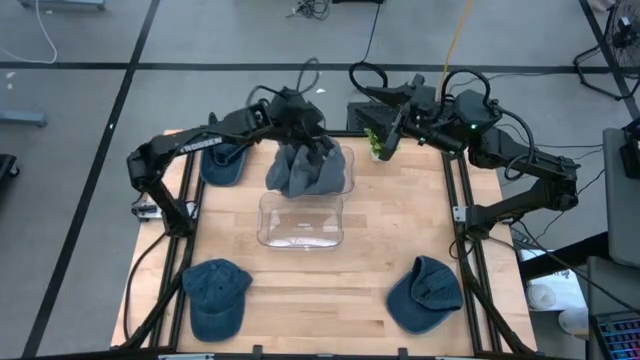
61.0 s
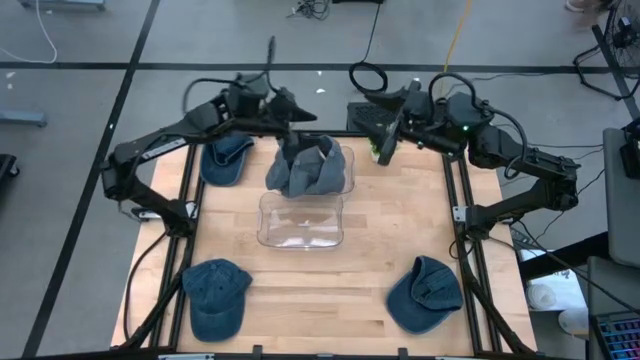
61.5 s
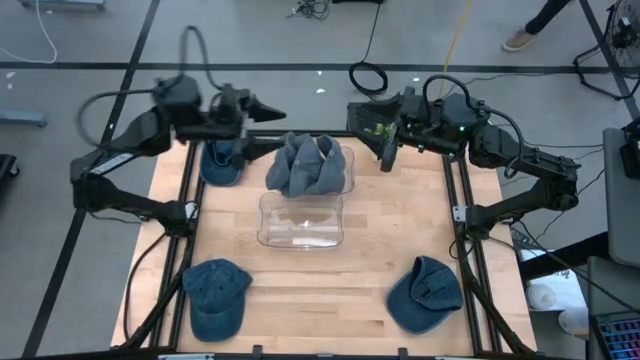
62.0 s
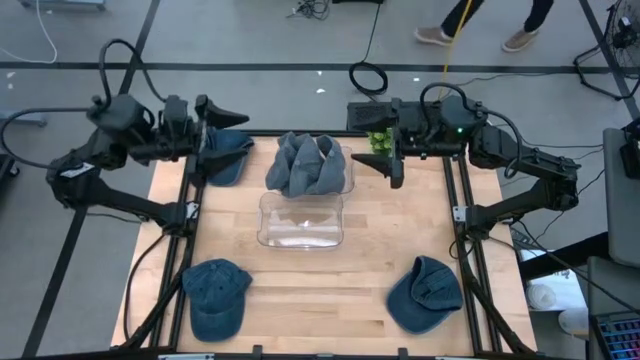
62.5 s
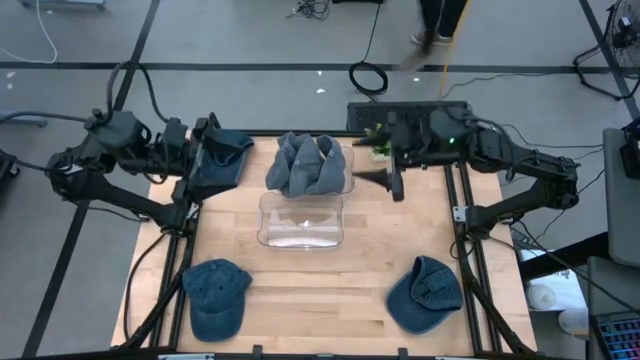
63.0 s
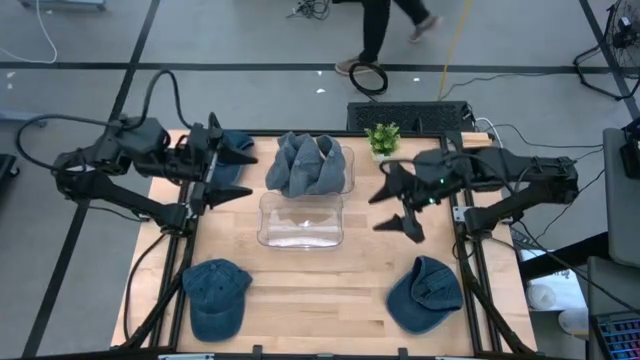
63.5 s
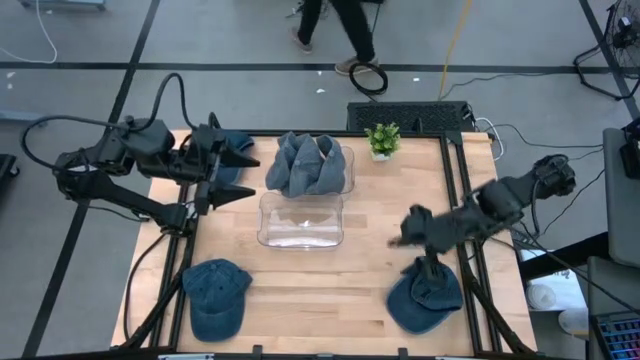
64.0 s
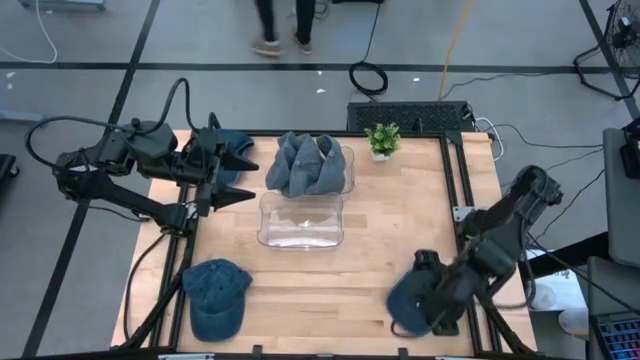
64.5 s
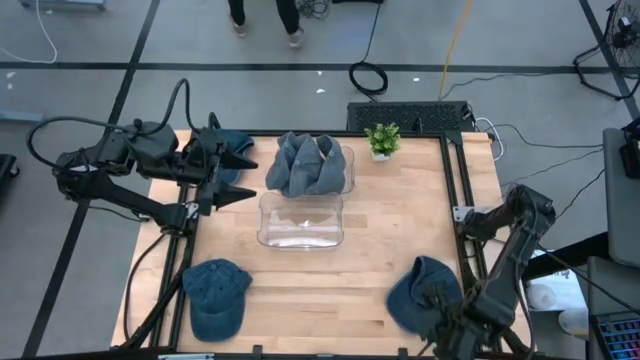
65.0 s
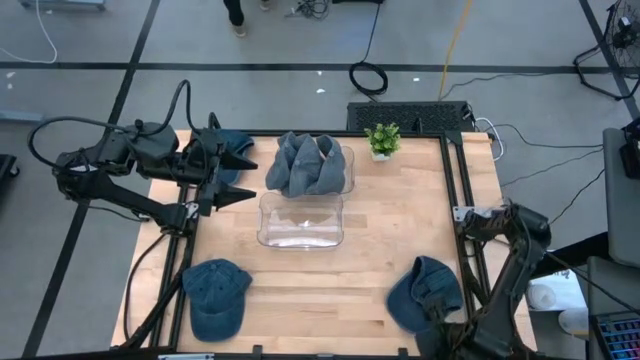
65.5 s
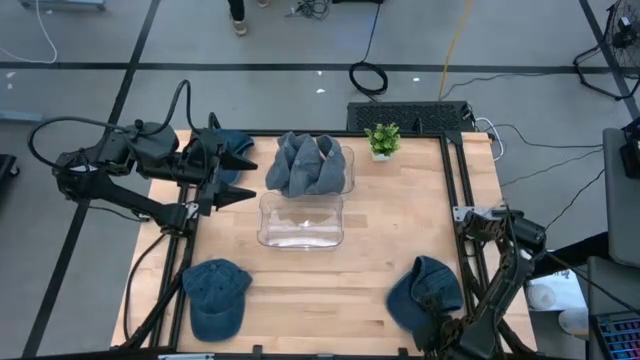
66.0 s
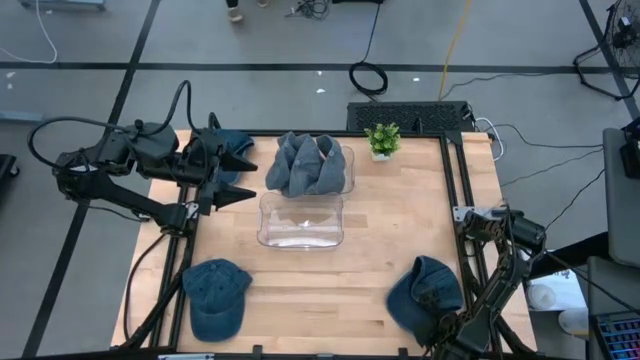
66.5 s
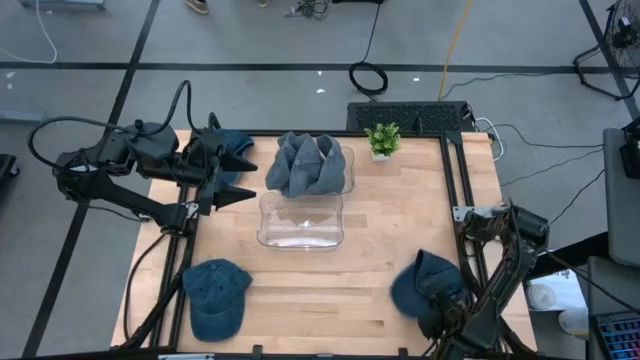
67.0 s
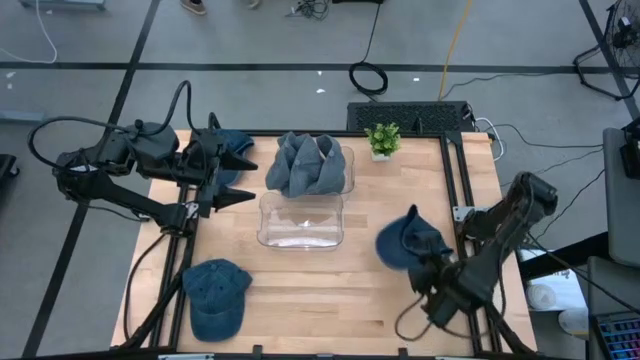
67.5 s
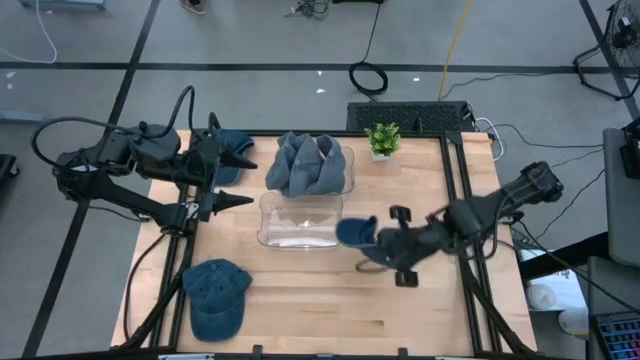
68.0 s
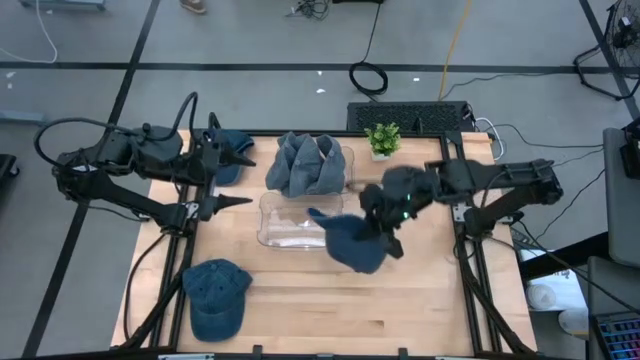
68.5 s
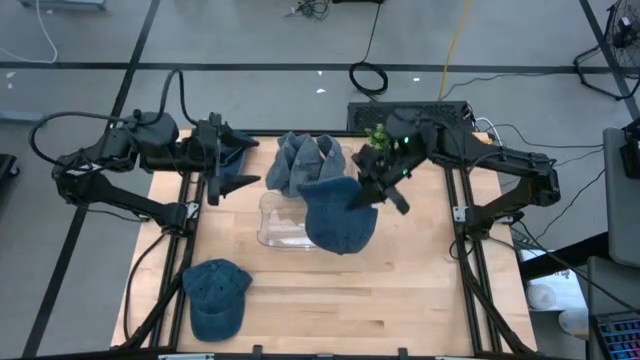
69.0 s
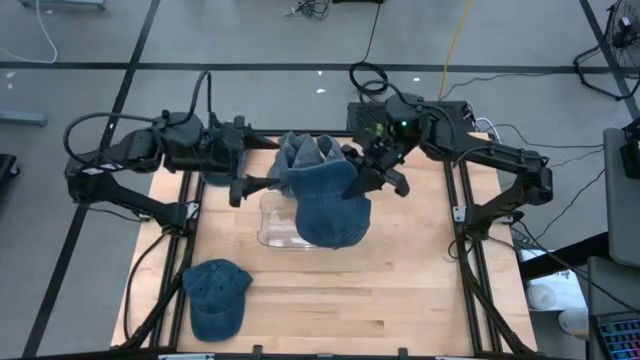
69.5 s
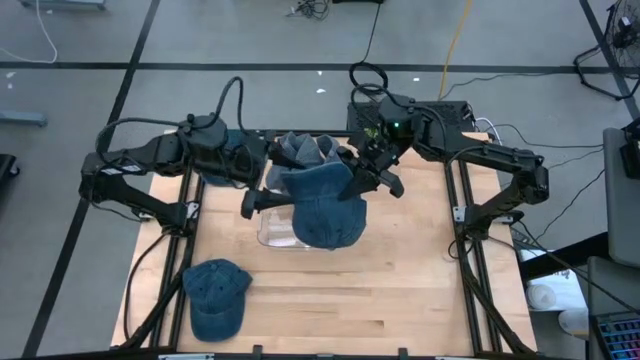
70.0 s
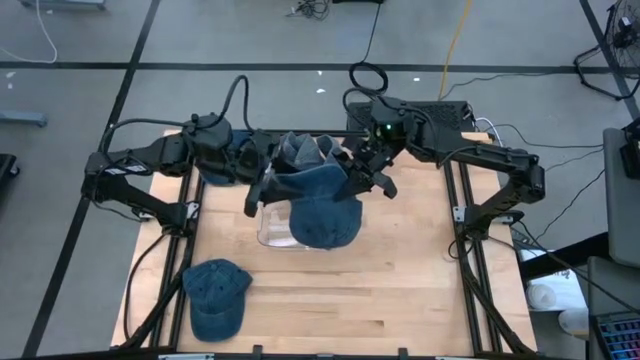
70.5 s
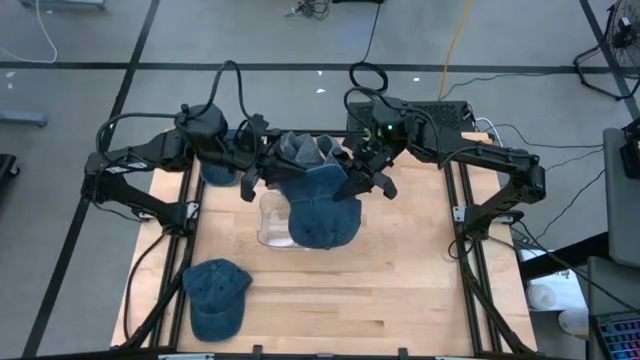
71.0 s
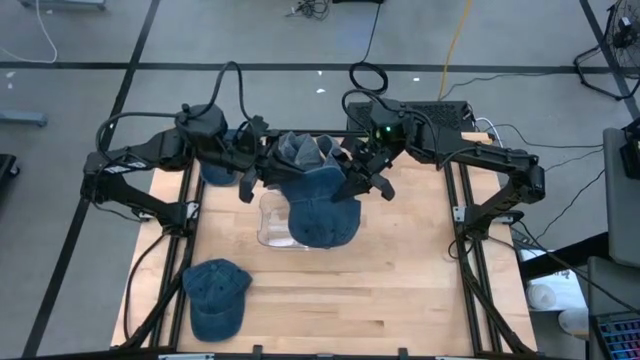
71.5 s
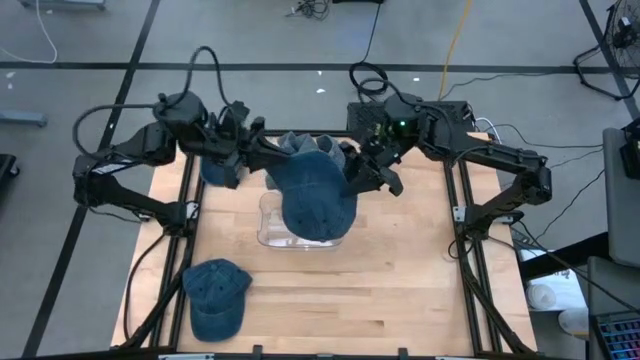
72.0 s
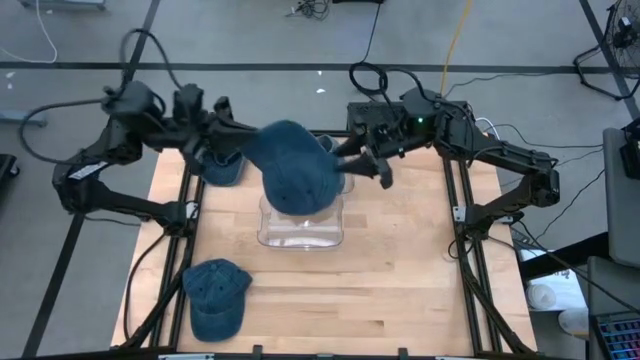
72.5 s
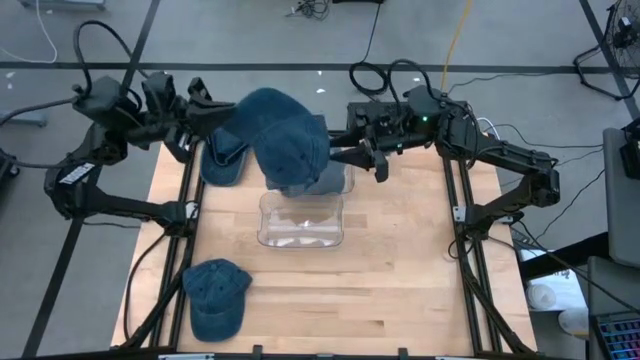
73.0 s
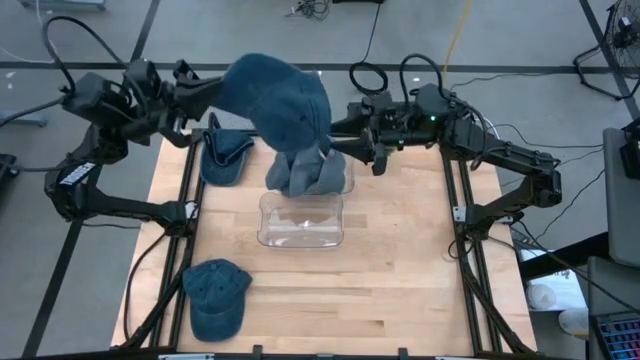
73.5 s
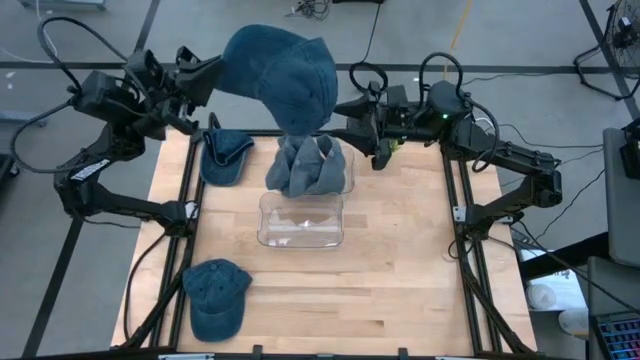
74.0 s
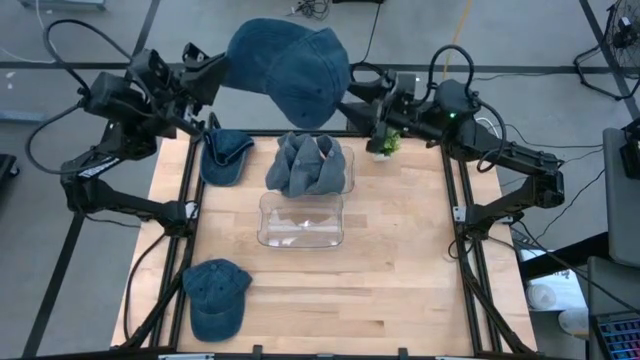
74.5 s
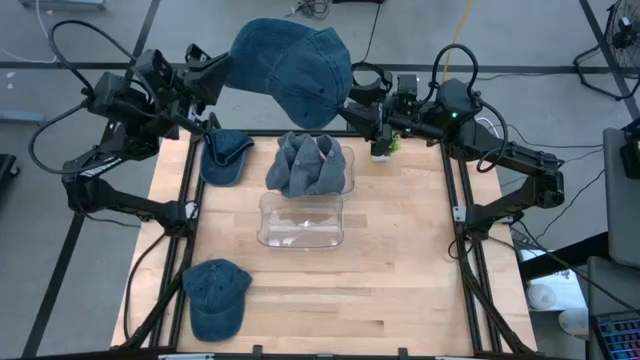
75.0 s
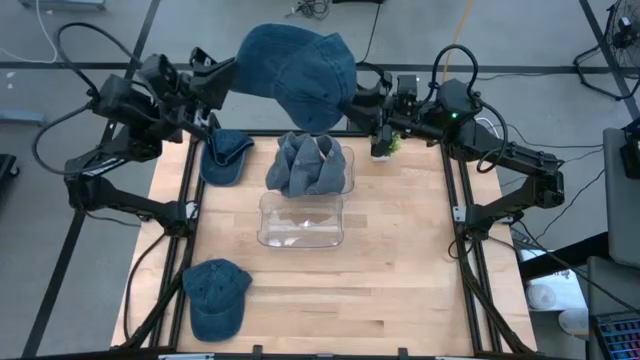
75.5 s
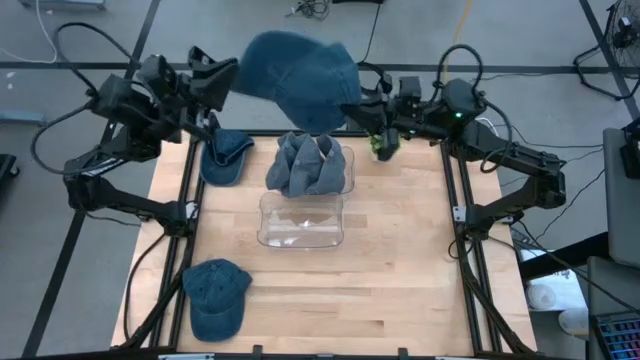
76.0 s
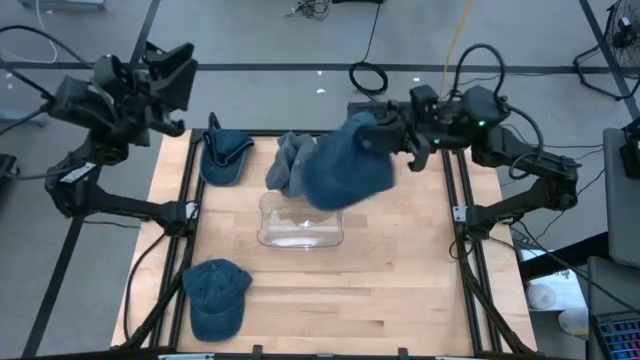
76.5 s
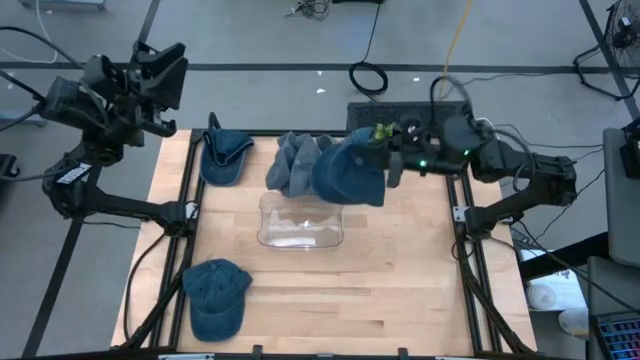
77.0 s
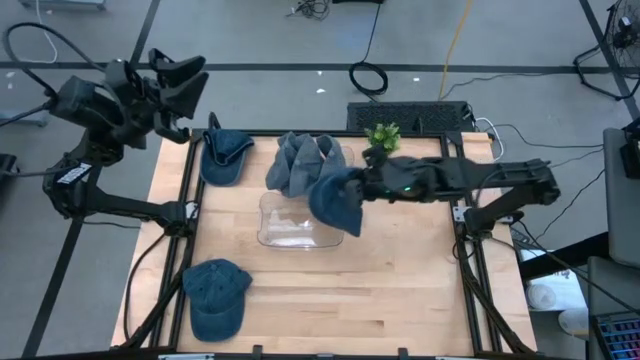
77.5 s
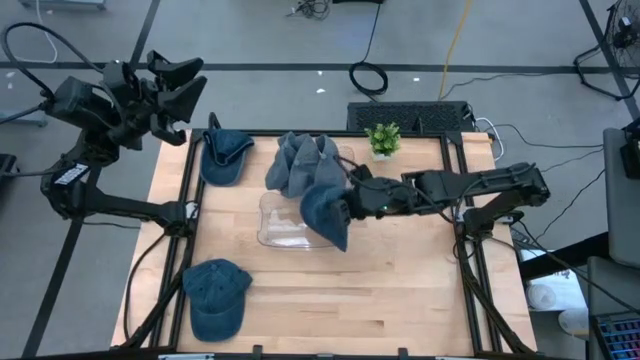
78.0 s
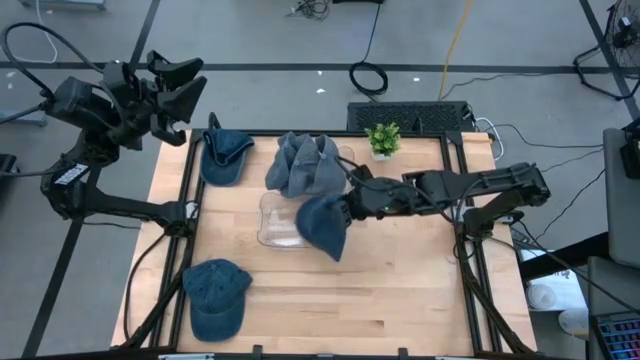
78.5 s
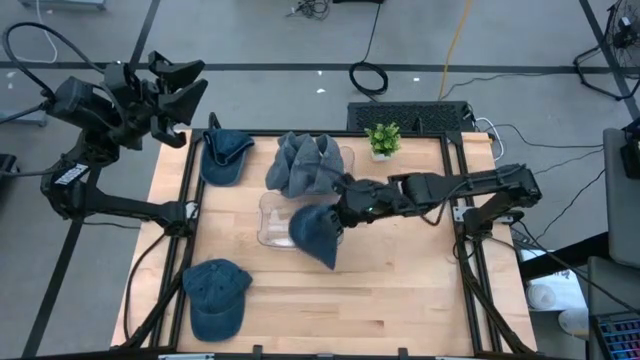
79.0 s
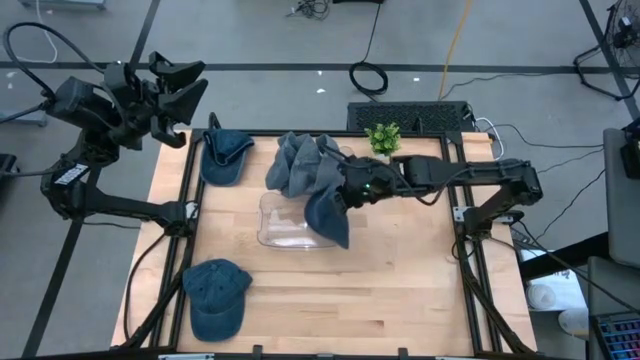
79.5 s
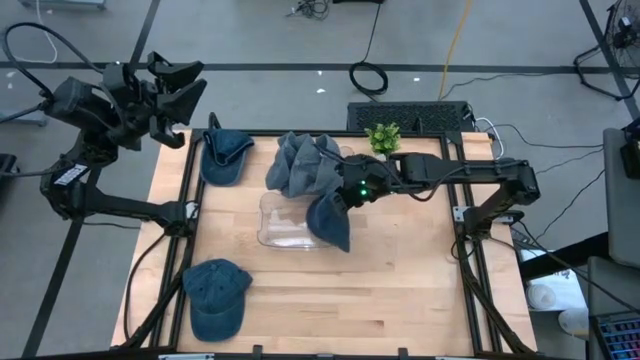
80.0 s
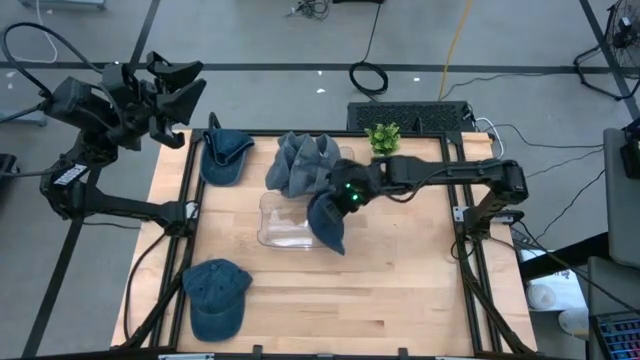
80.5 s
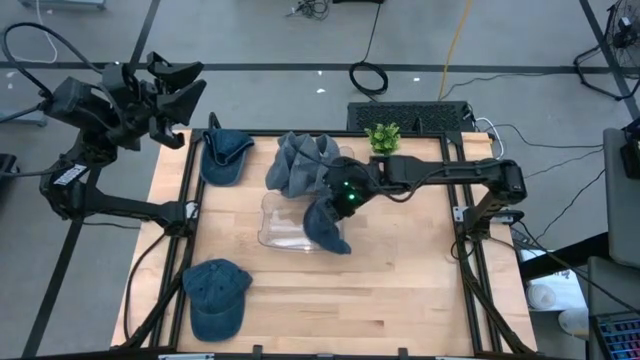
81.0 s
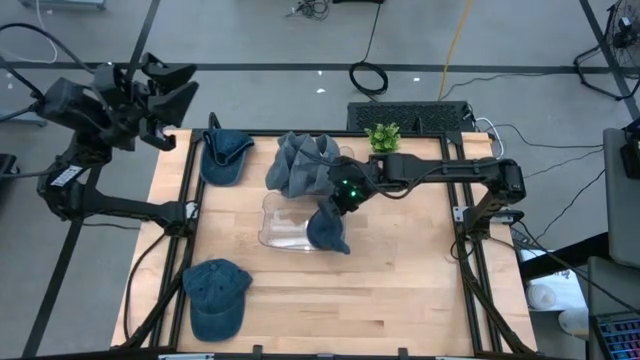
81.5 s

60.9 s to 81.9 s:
Task: Pick & Place hat
Put the bottom right blue cap into the bottom transparent bin
